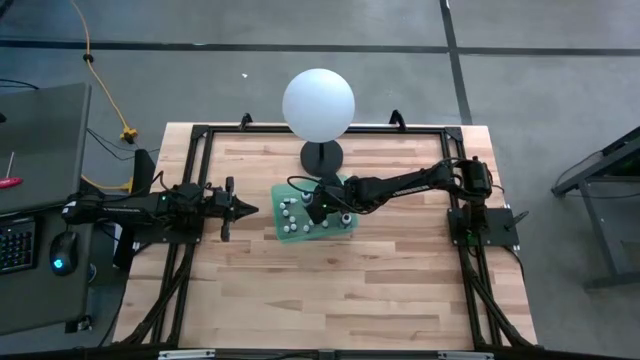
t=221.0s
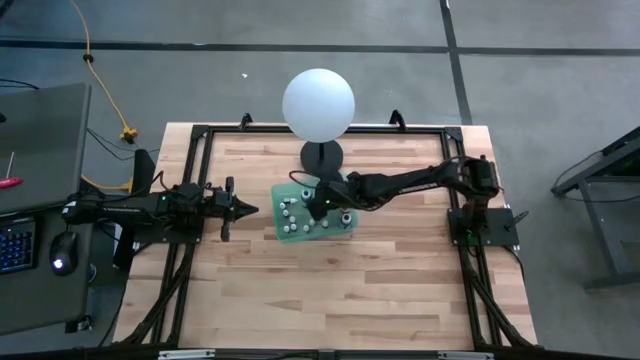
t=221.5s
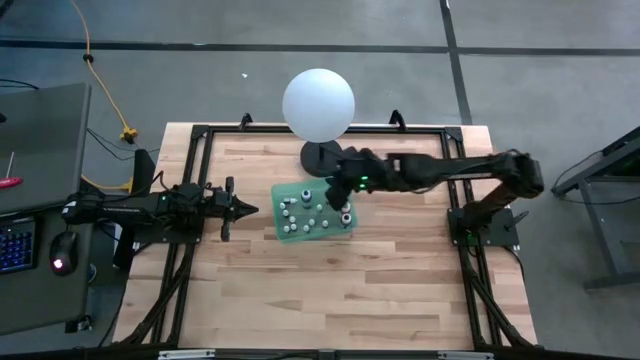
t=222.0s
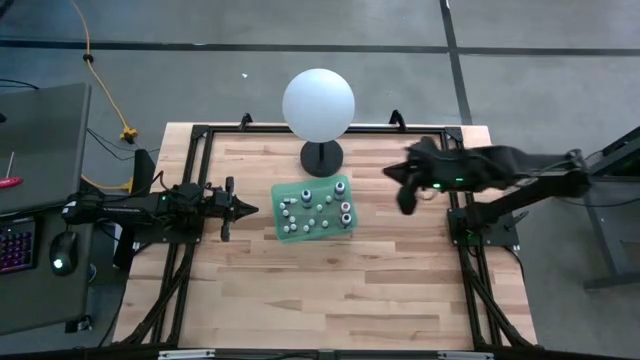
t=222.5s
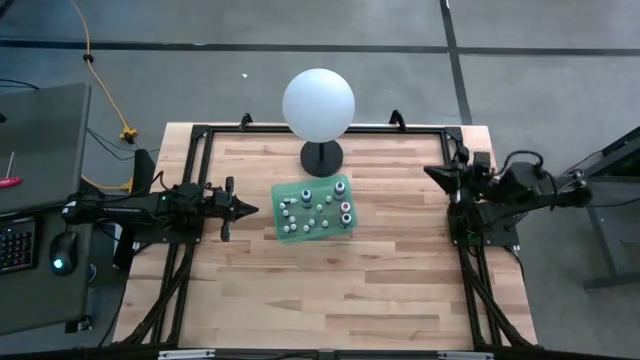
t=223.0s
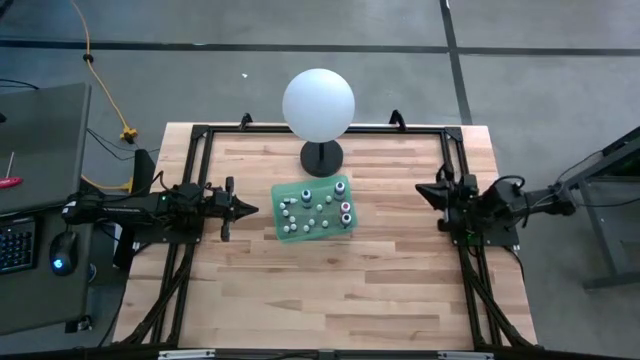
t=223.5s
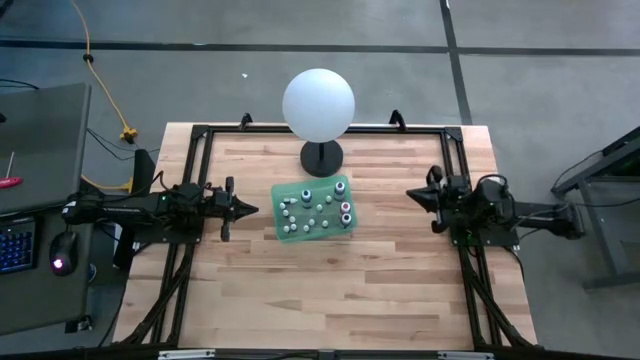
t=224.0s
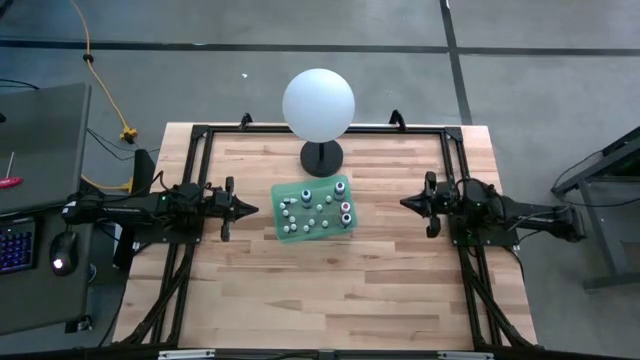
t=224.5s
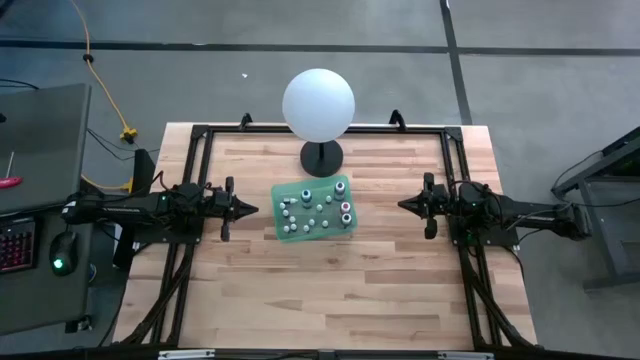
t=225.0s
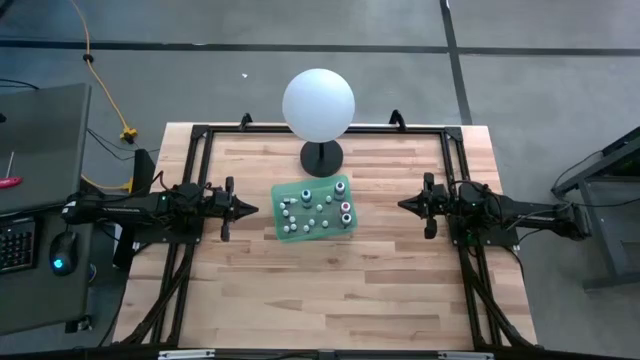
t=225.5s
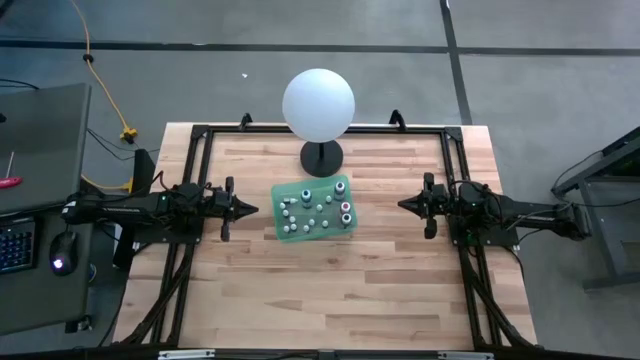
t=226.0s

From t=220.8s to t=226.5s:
Task: Pick & Place food coloring
Return to Home Position

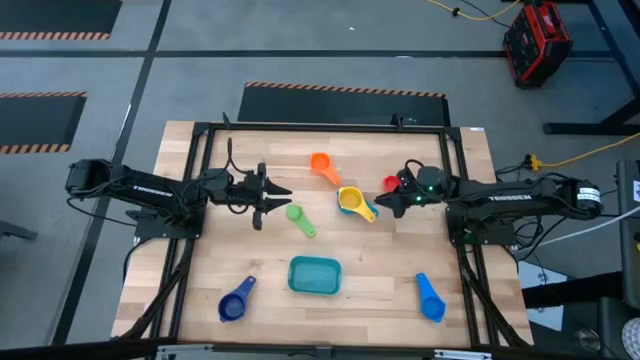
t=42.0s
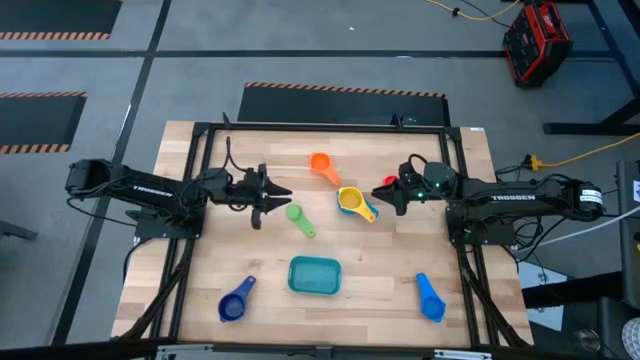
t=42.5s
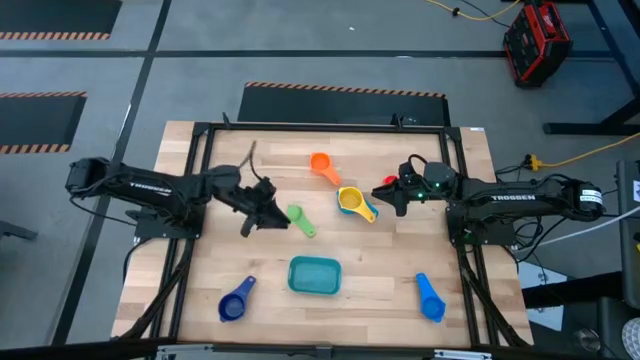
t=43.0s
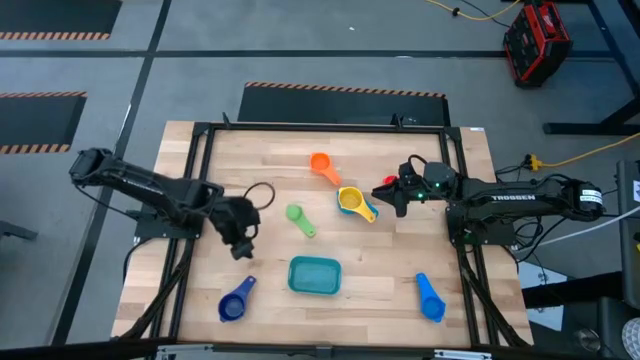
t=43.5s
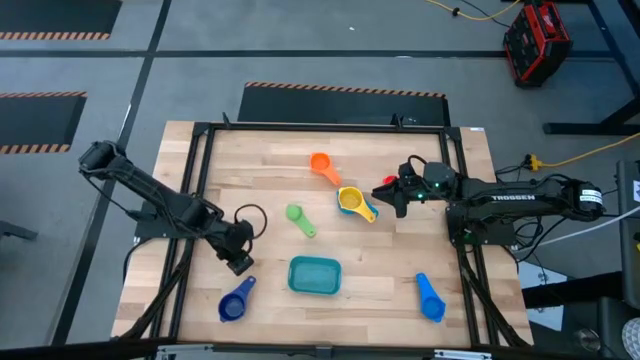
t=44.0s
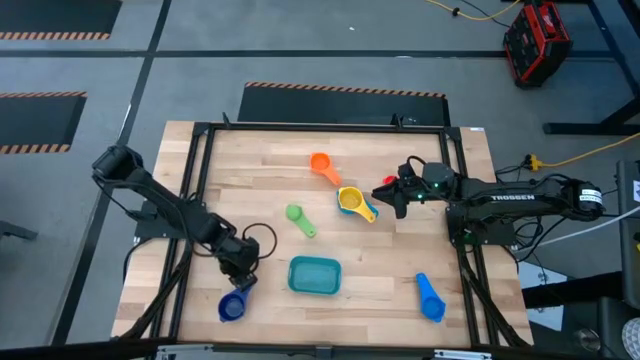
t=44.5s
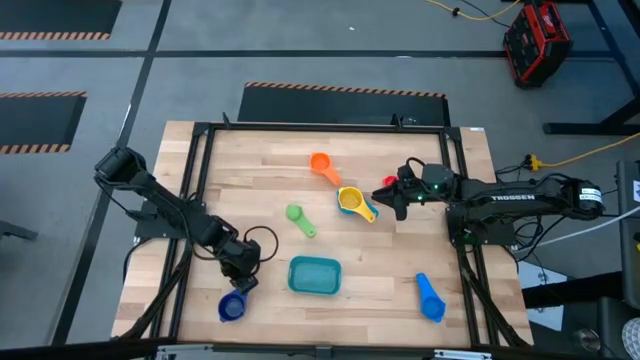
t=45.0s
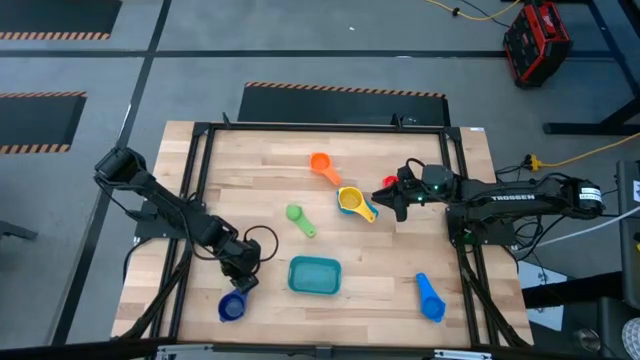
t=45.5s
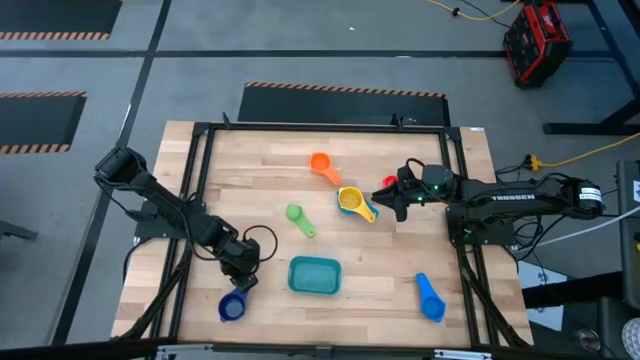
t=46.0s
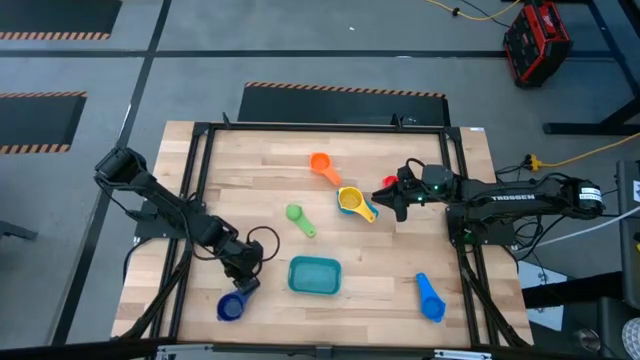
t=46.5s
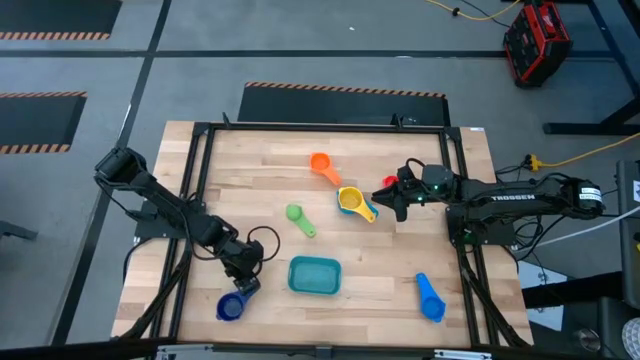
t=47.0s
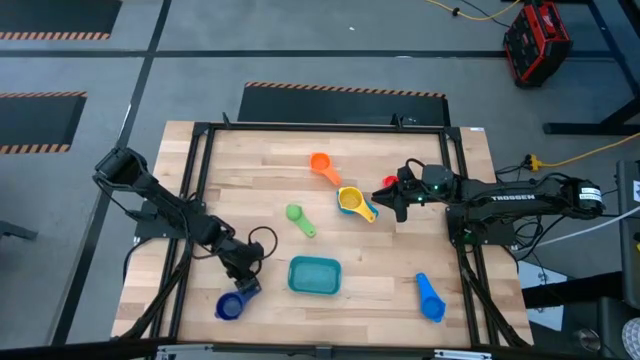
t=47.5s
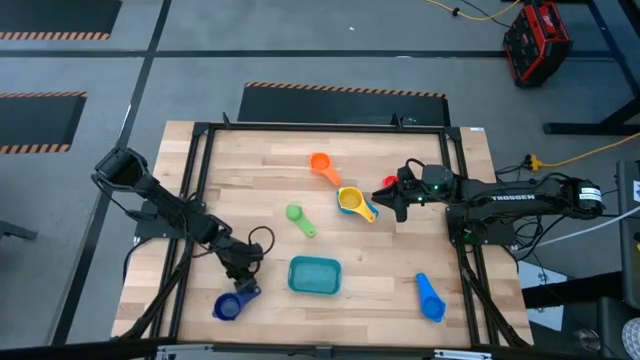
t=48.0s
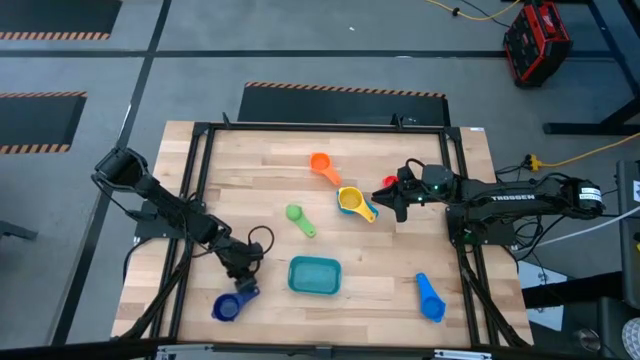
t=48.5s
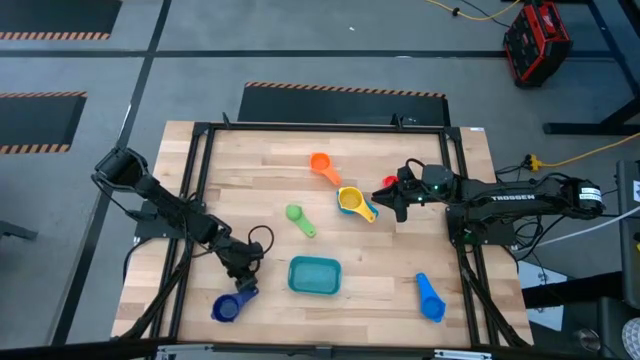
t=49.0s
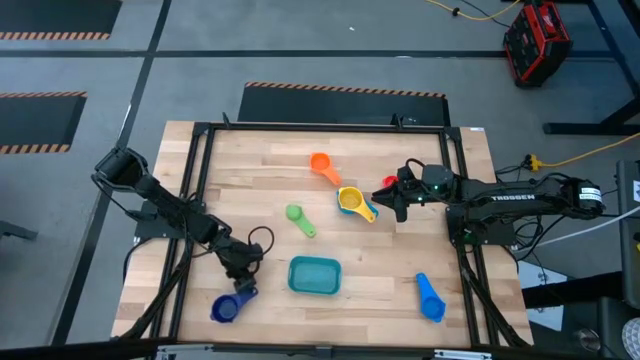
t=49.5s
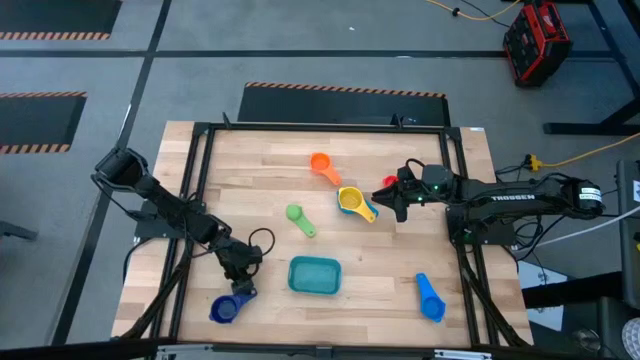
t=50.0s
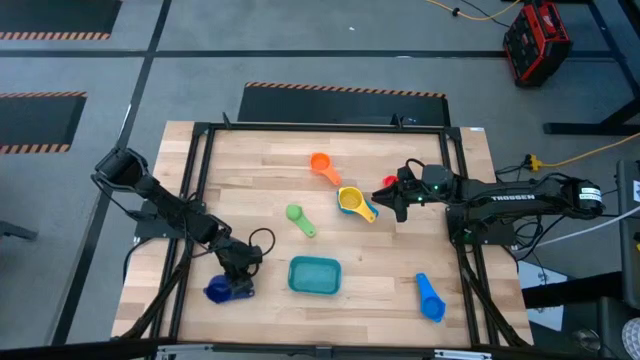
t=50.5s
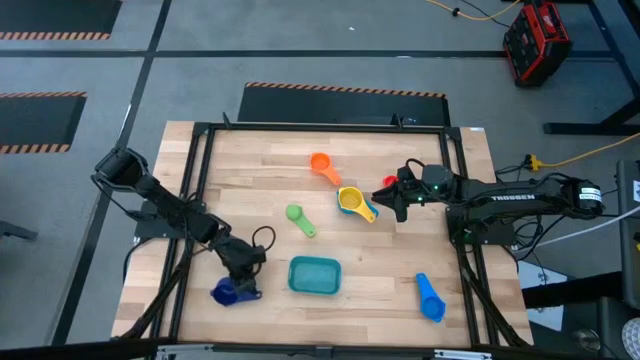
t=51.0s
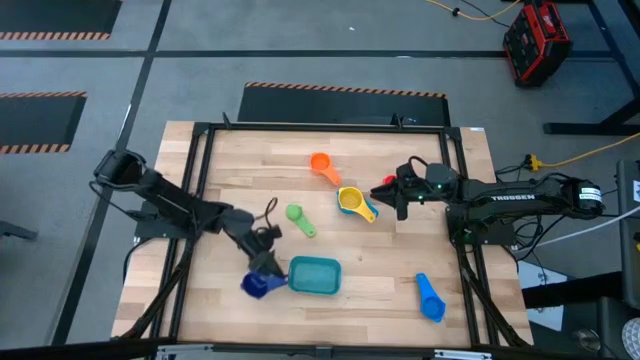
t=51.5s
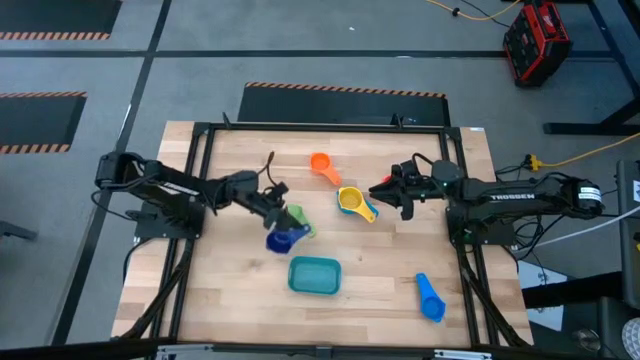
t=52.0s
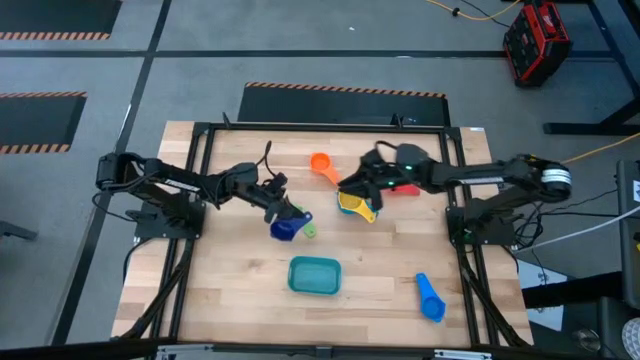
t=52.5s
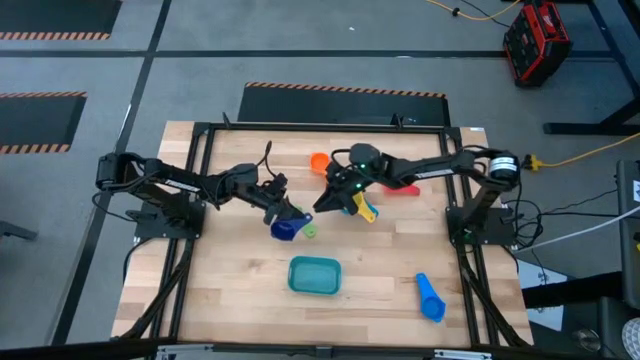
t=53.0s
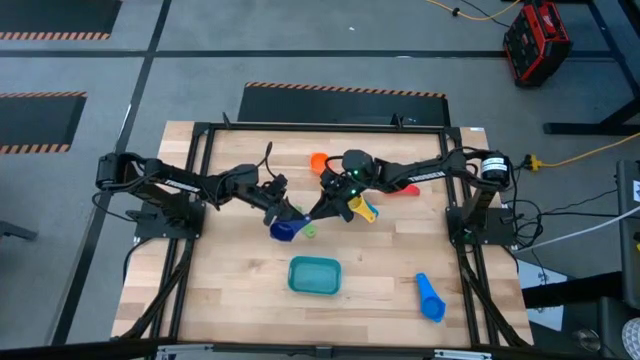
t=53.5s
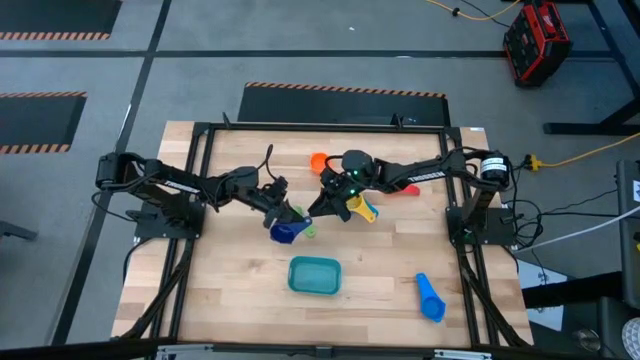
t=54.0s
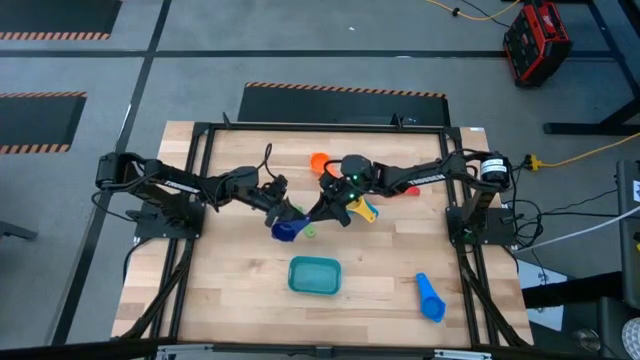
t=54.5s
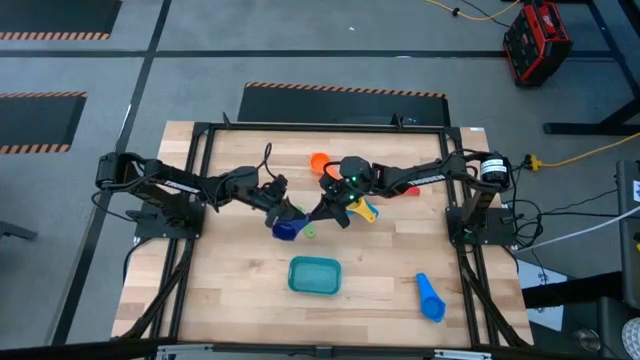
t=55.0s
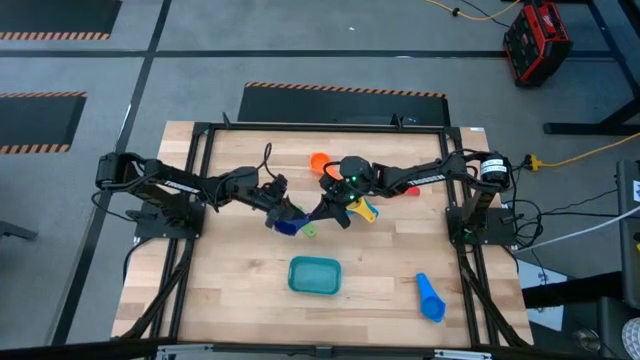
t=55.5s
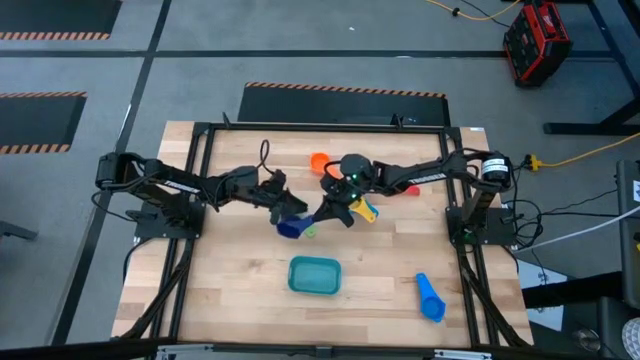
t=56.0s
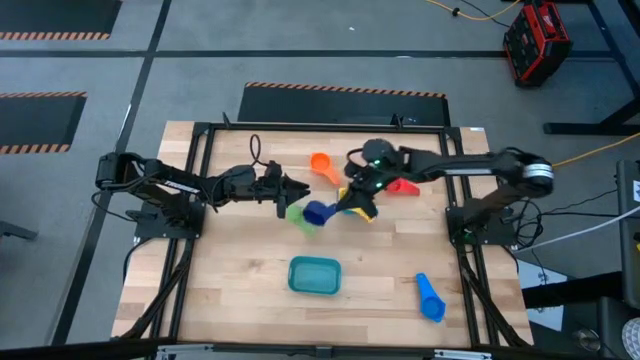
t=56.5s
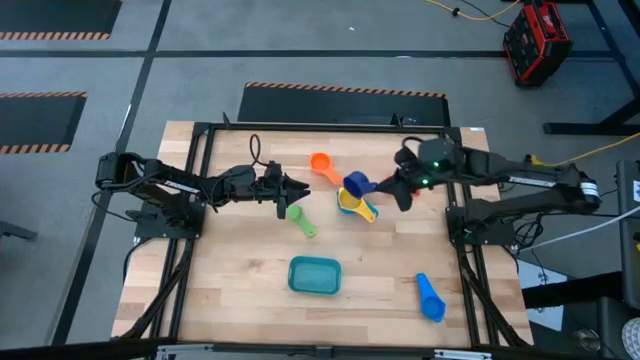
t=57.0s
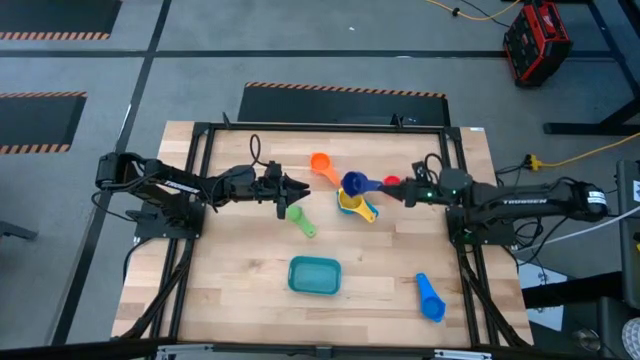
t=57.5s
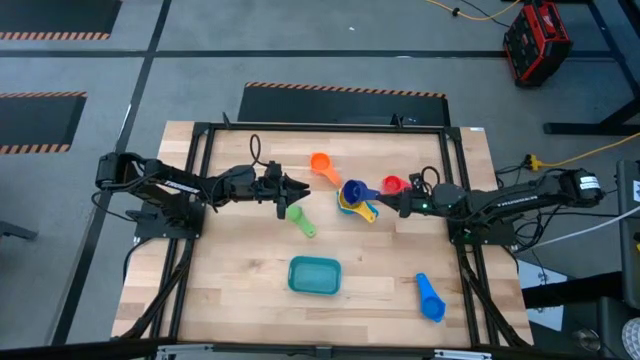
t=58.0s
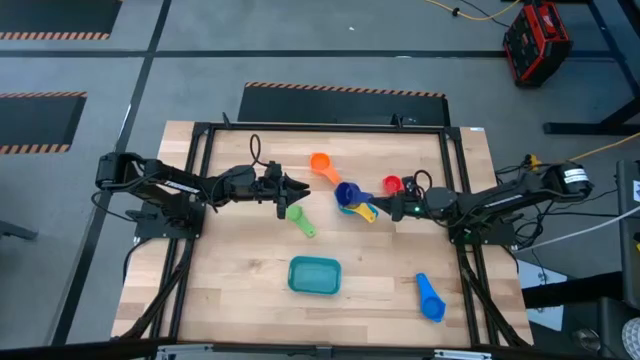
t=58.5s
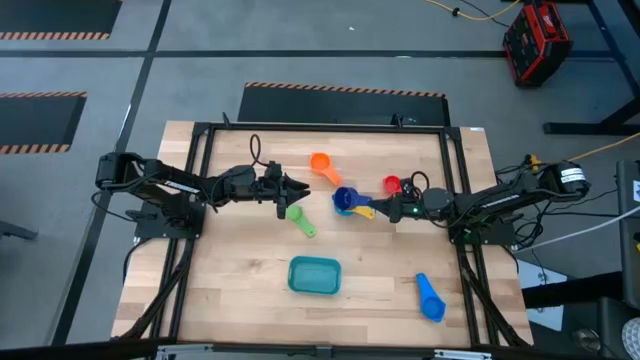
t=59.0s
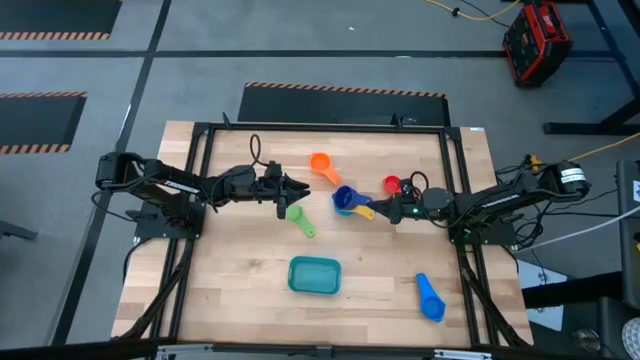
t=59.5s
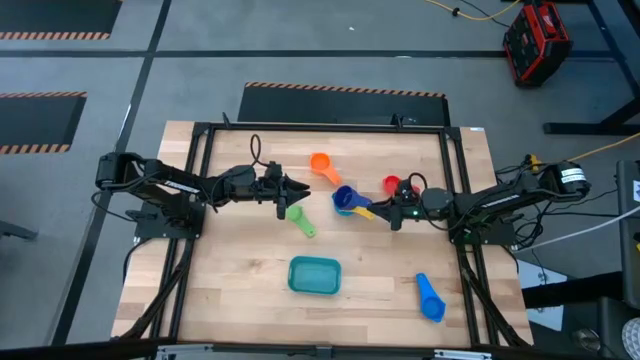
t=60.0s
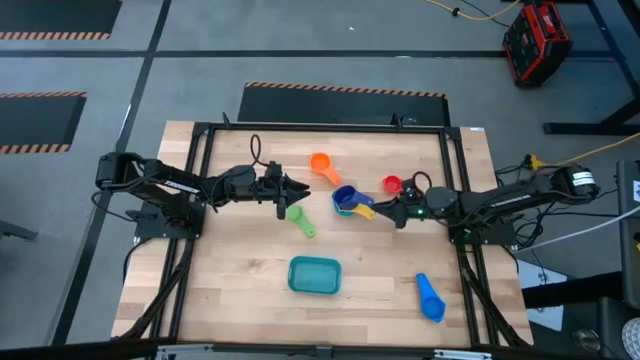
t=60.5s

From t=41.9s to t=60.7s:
Task: Nest measuring cups in basket
Stack the dark blue measuring cup on top of the yellow measuring cup
